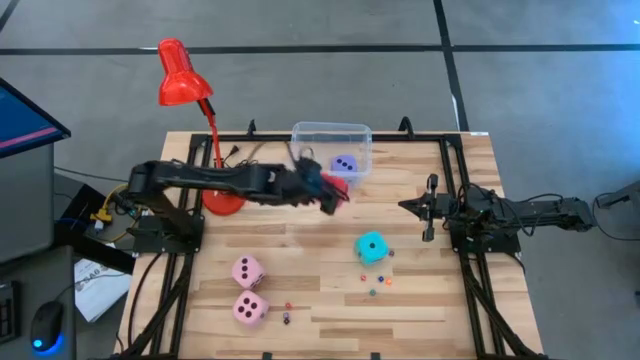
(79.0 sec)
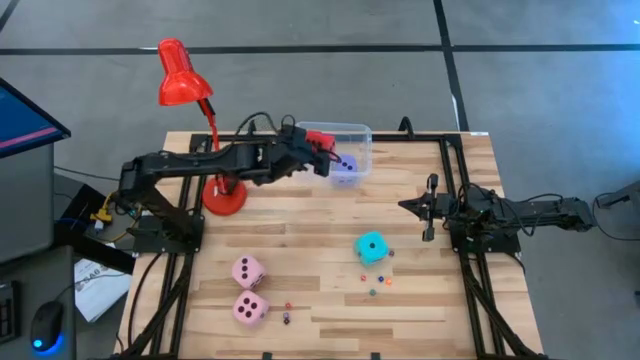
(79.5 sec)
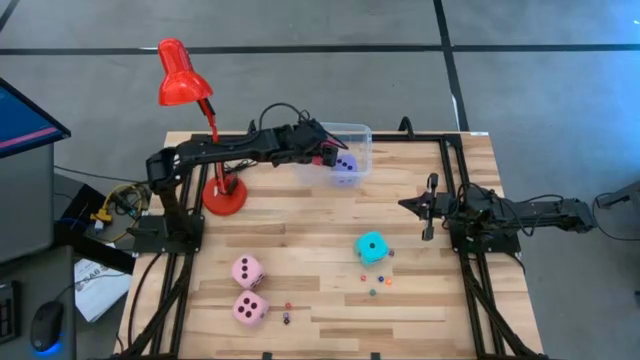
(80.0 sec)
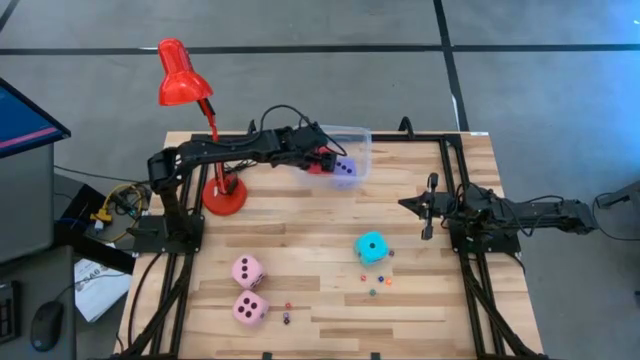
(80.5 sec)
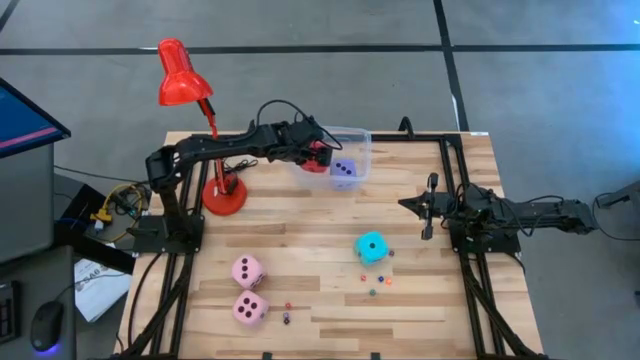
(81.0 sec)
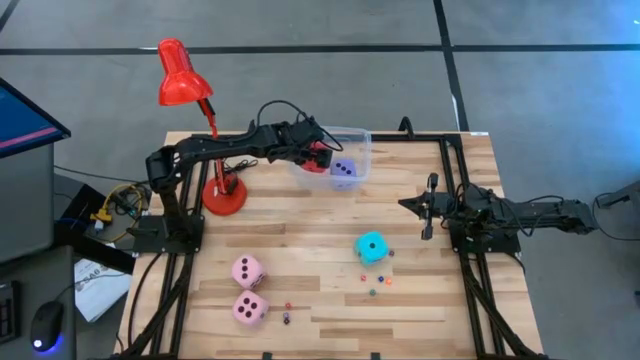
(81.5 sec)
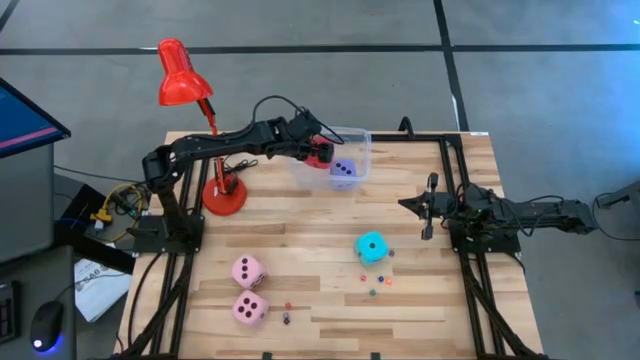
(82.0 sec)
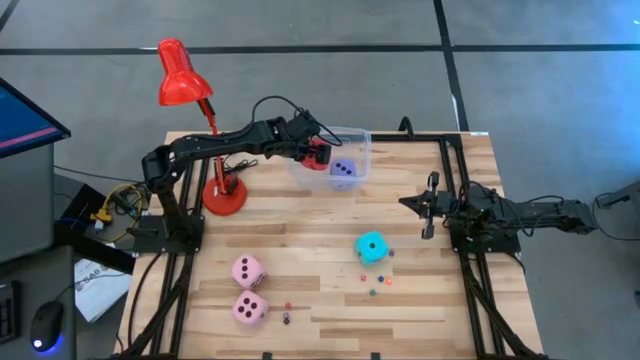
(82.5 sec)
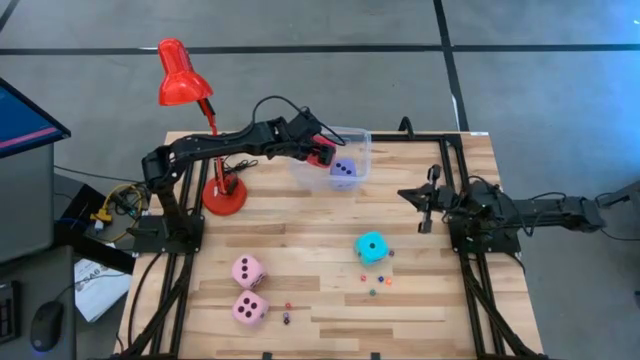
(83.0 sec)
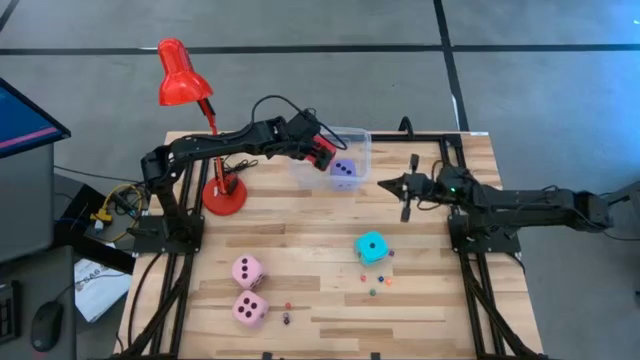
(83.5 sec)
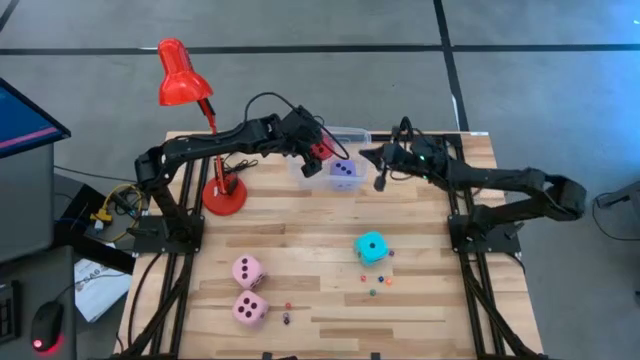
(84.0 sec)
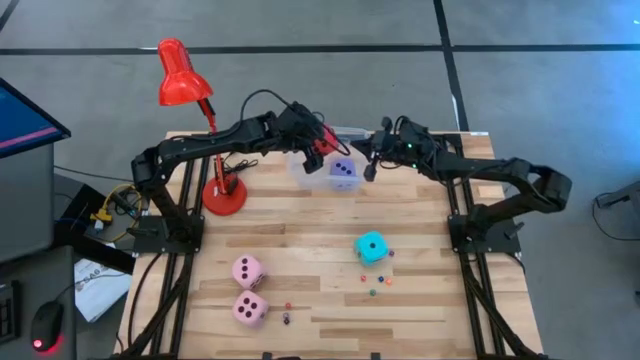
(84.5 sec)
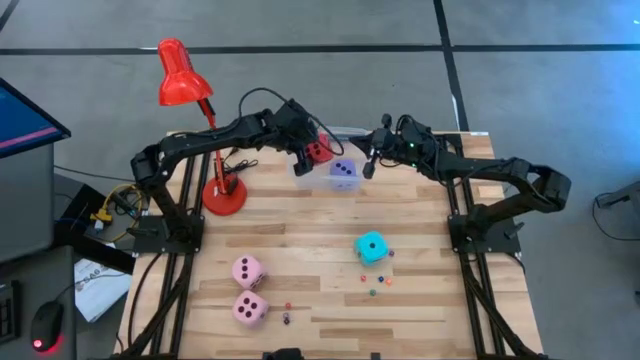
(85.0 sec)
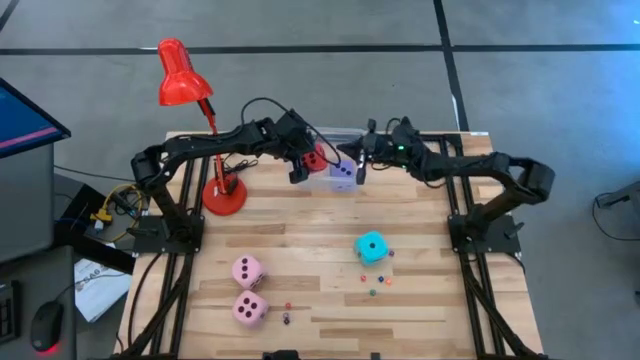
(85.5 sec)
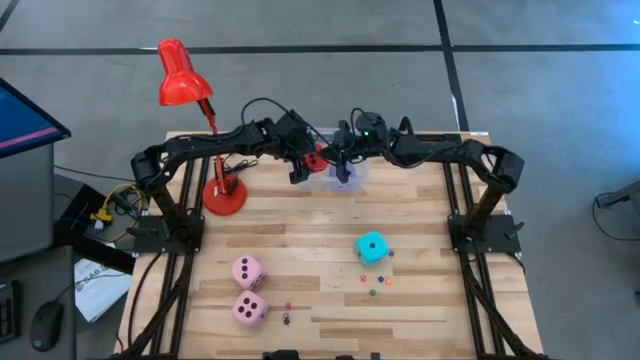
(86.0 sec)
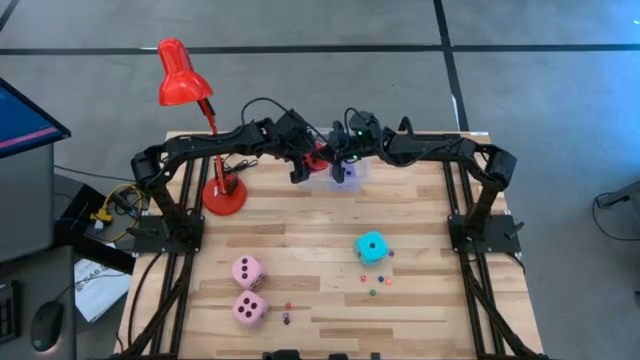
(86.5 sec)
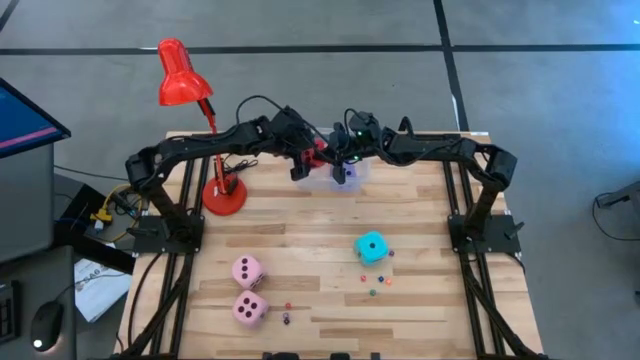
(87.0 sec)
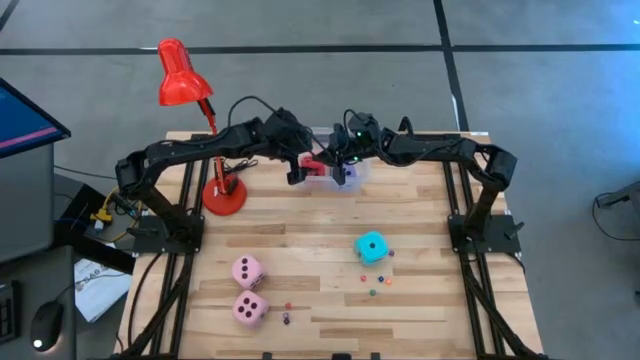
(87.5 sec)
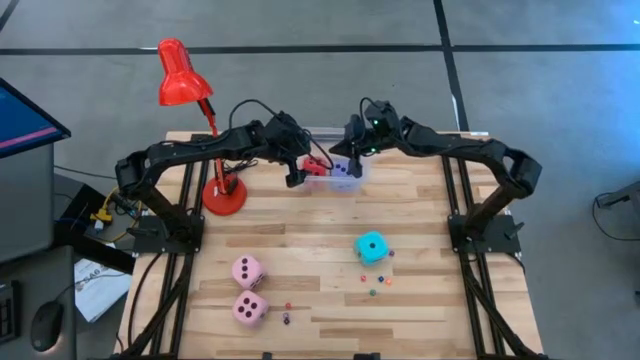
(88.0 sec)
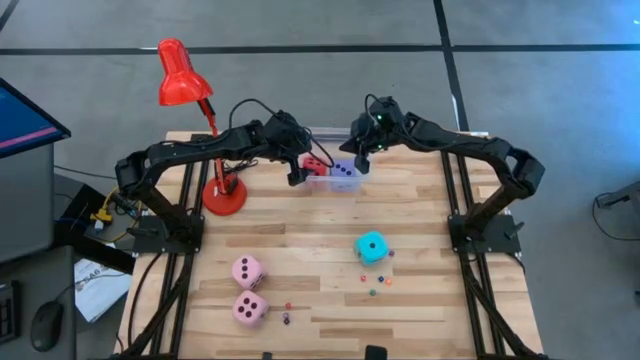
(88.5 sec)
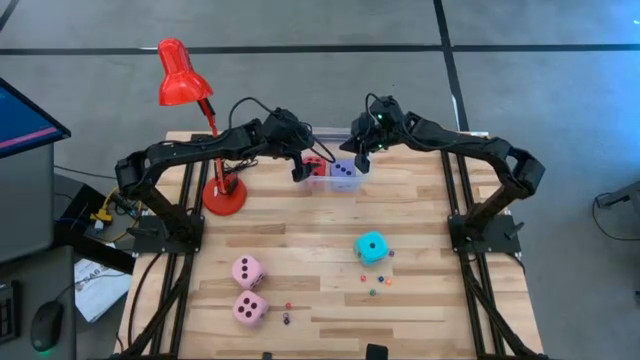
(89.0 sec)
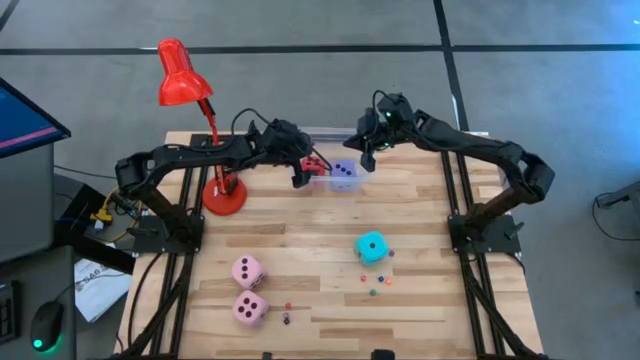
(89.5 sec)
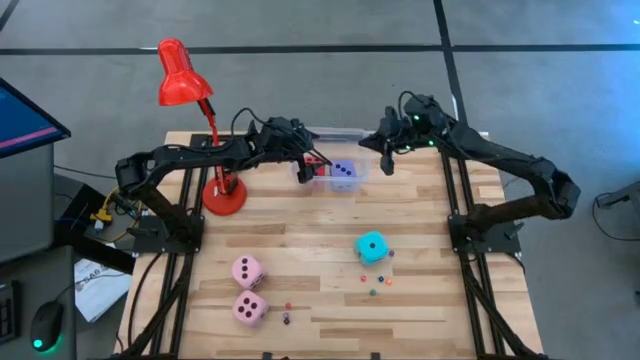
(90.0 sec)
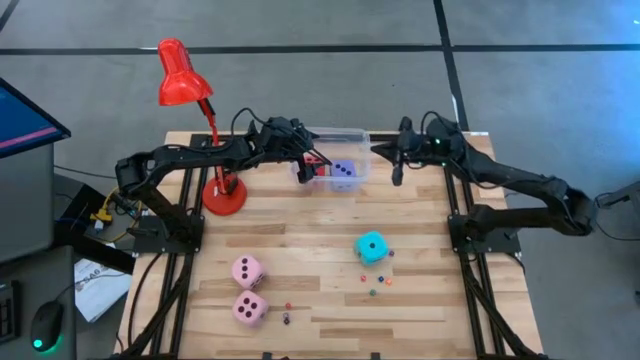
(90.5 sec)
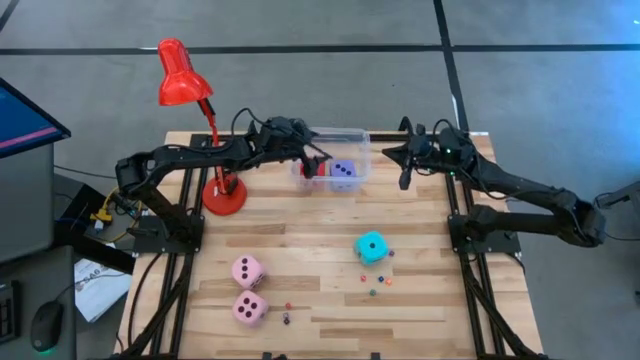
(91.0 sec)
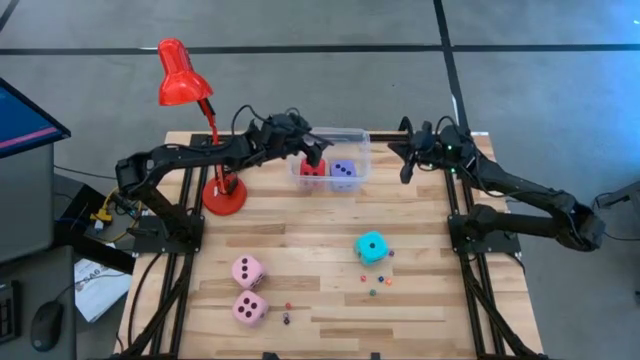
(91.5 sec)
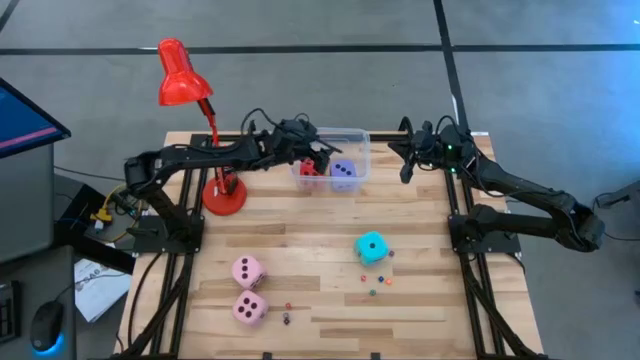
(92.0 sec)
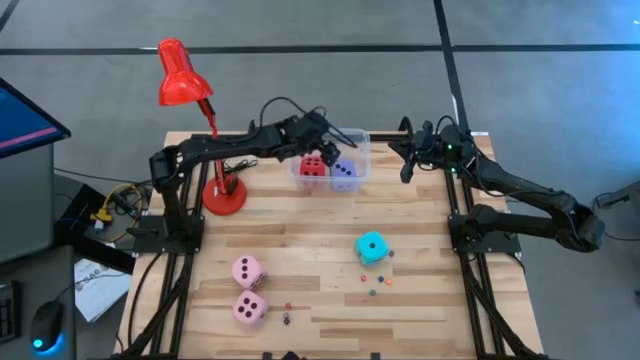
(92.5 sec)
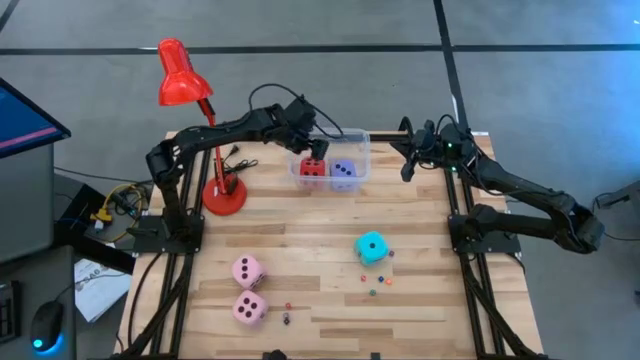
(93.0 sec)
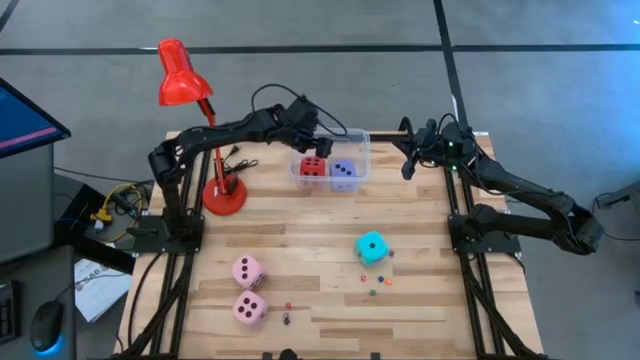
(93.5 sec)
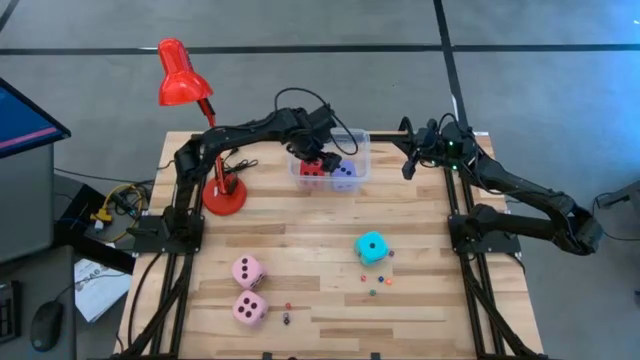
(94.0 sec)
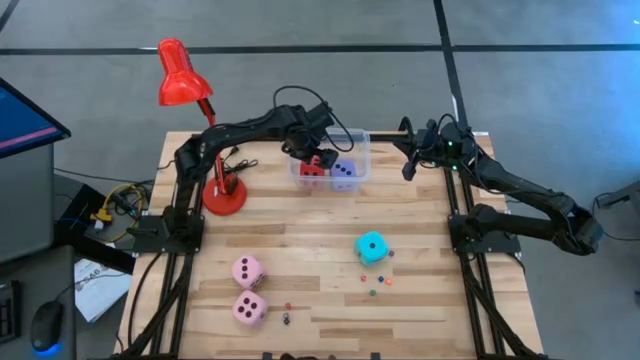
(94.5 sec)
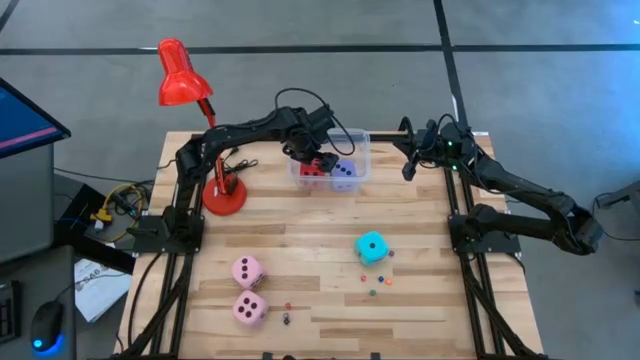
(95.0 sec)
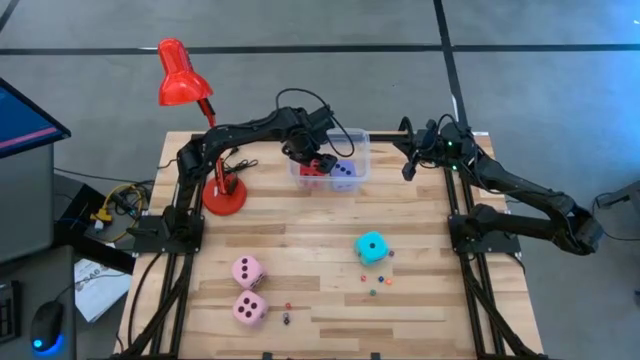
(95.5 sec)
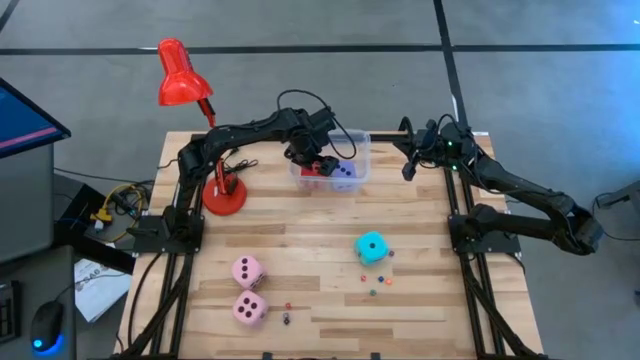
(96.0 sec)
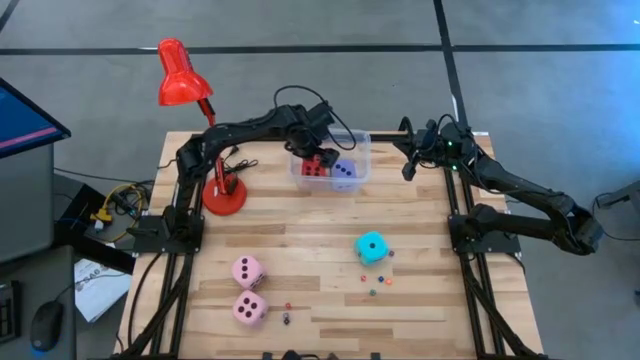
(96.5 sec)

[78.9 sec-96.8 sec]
Task: Pick & Place Dice
Put the large red die into the transparent bin

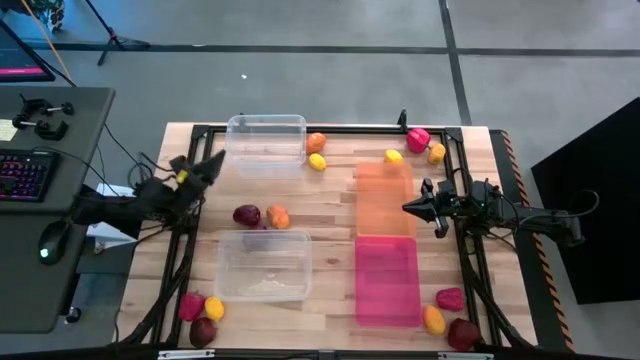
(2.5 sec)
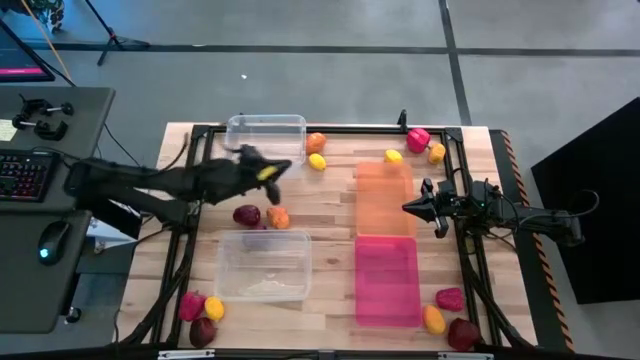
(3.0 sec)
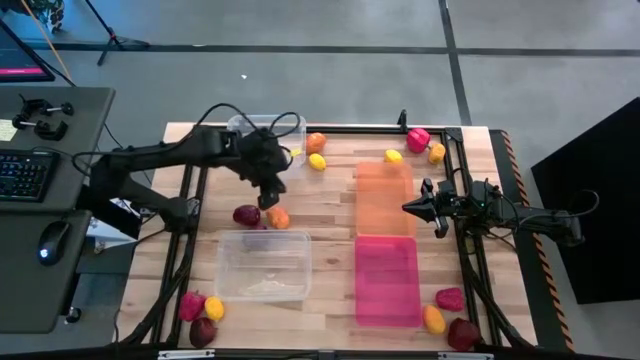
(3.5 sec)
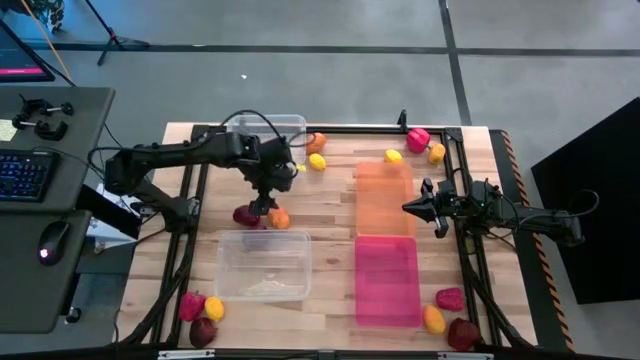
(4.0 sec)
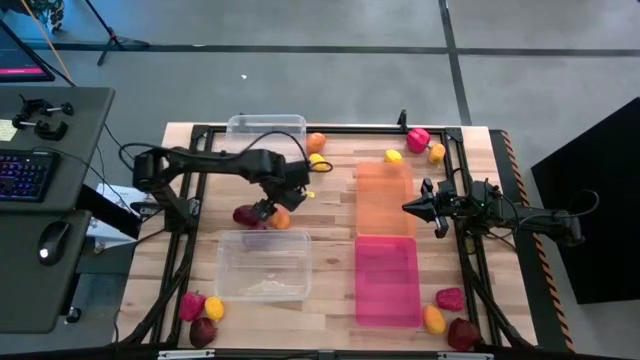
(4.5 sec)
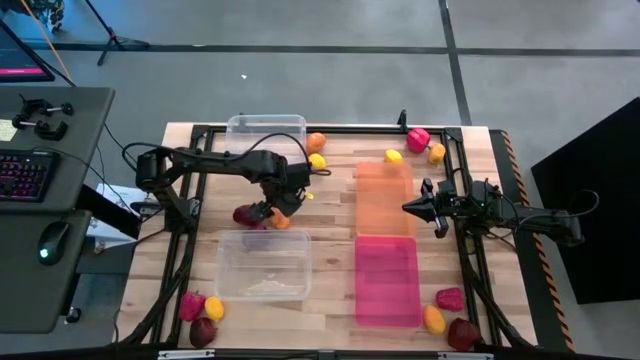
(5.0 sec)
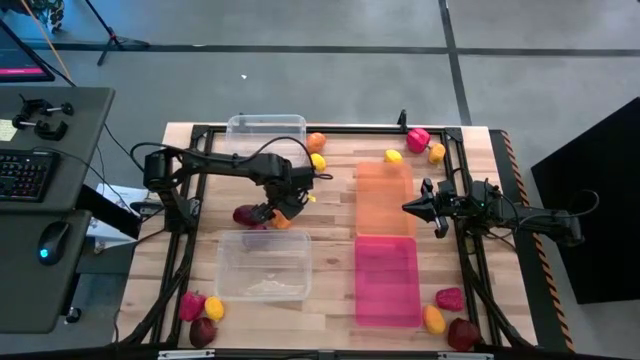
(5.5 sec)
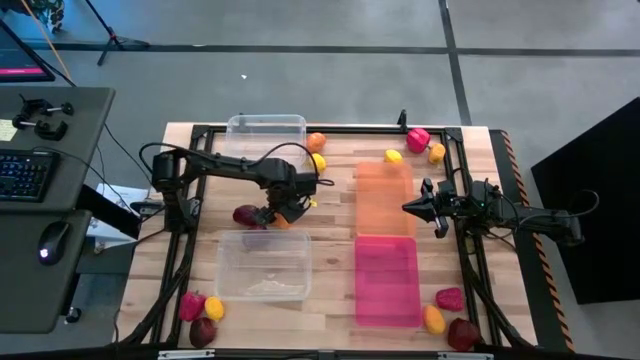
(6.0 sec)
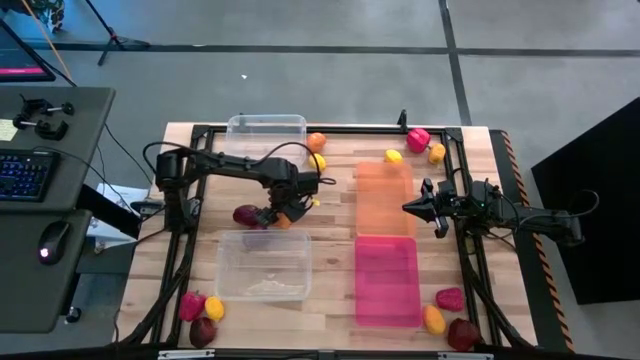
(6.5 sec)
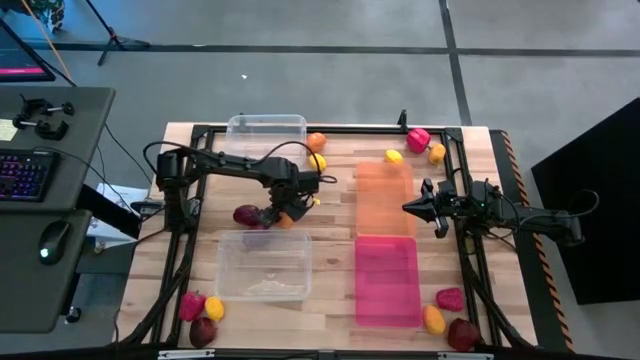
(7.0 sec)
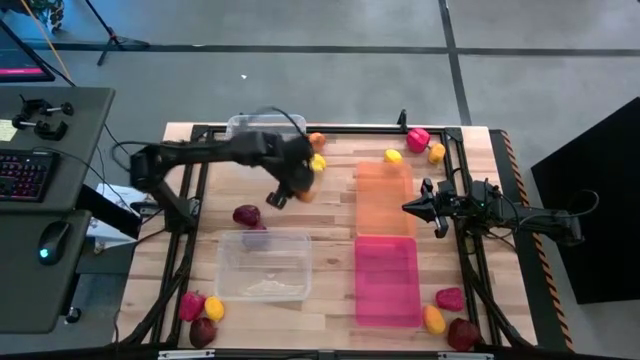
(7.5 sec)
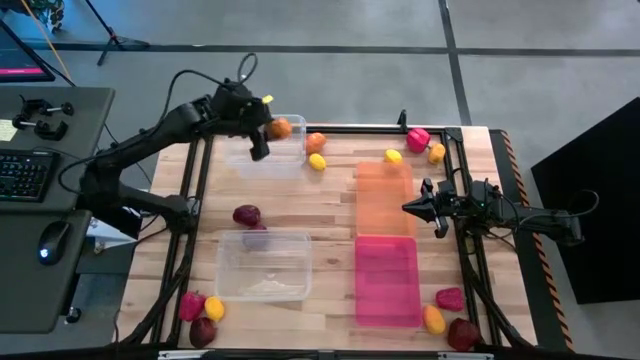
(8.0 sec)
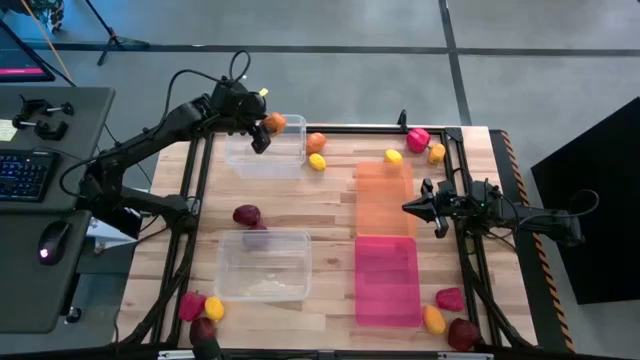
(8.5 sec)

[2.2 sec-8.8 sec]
Task: Sort produce into baskets
Put the yellow mango into the top transparent bin
